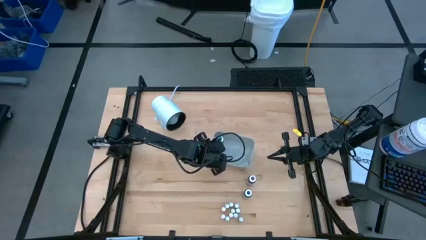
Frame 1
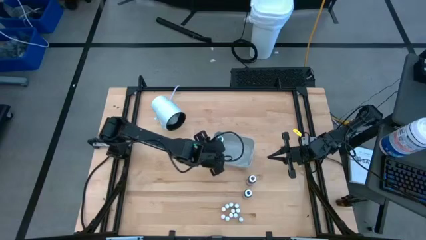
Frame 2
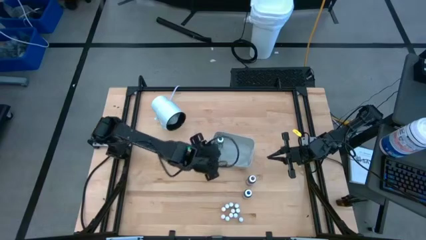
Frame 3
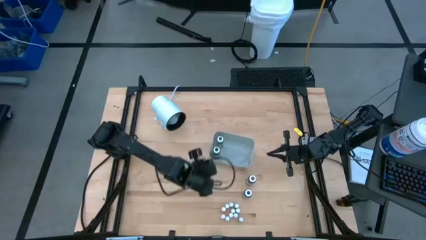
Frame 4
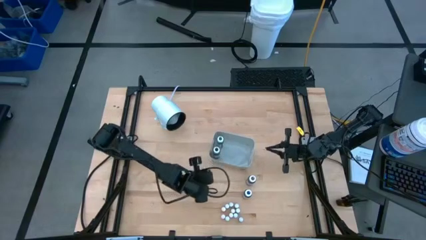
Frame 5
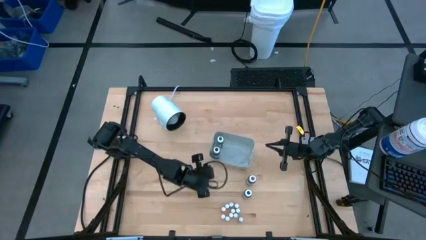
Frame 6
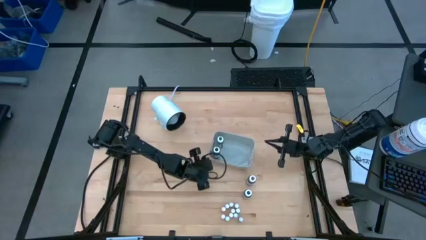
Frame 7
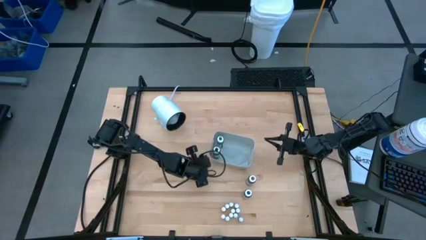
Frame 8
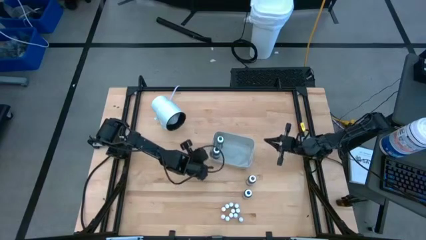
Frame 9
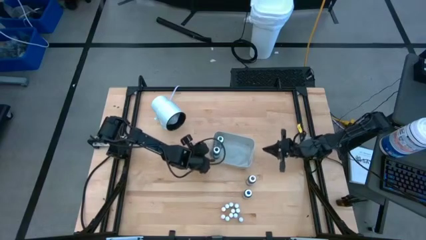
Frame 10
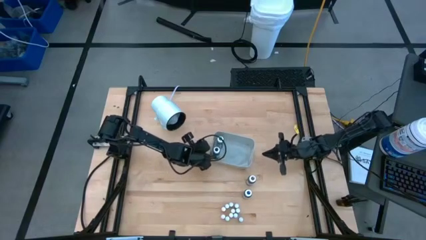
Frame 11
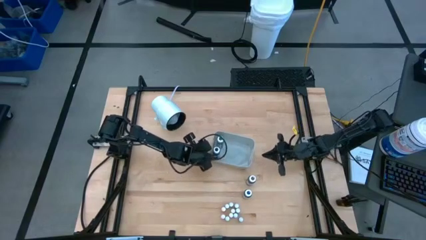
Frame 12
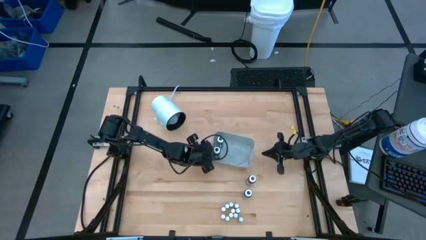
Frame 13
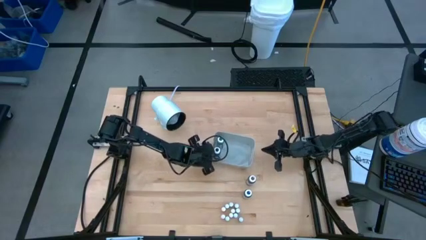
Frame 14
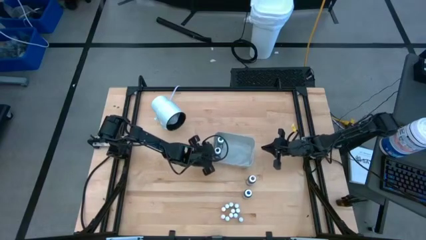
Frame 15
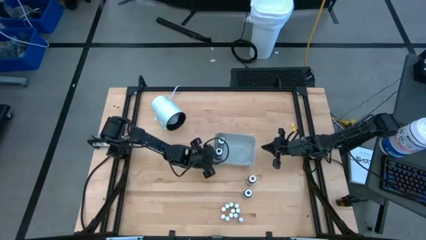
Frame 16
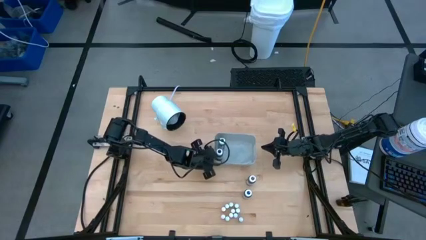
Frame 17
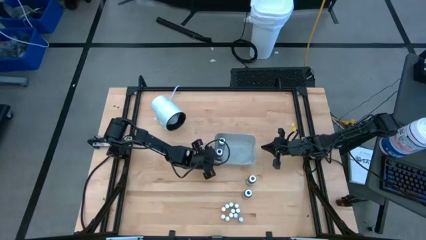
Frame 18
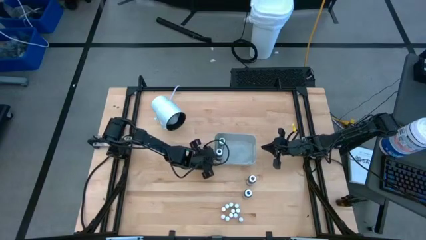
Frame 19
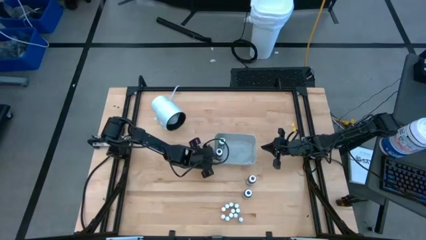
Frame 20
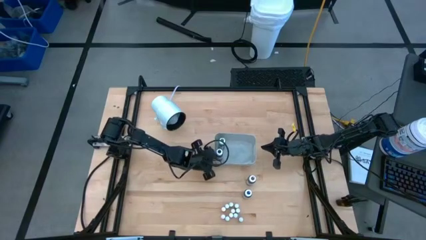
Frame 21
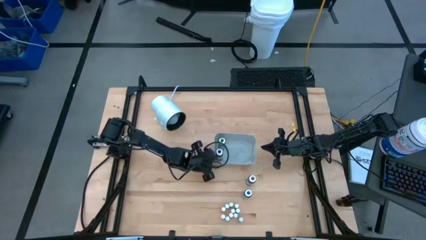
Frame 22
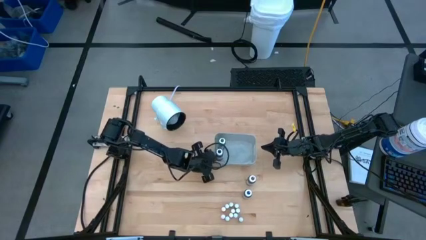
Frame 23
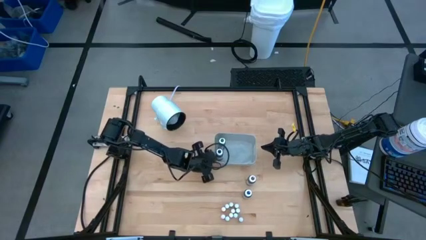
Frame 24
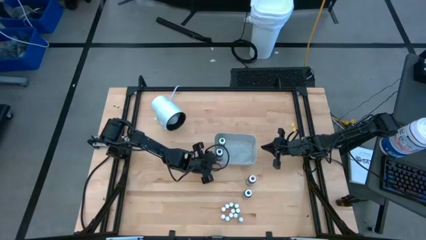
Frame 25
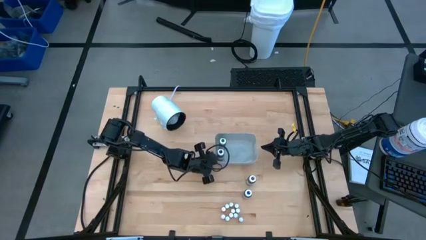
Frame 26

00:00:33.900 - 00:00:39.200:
Task: Pick & Place food coloring
Adjust the gray bin on the table

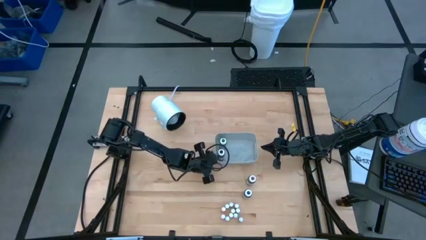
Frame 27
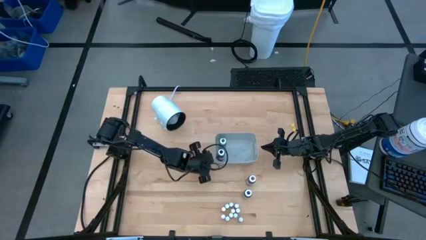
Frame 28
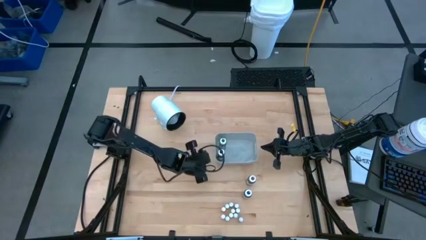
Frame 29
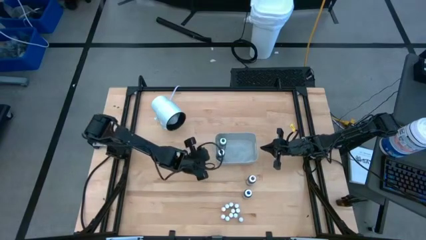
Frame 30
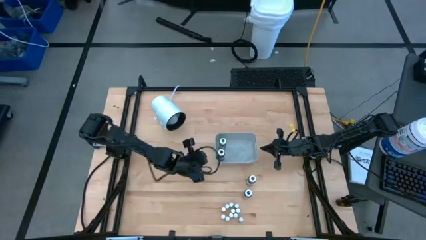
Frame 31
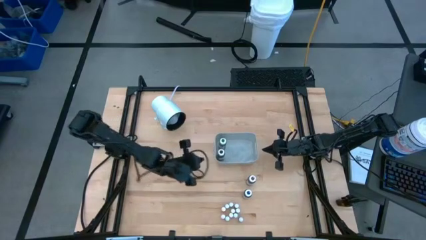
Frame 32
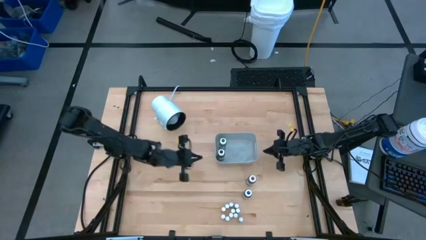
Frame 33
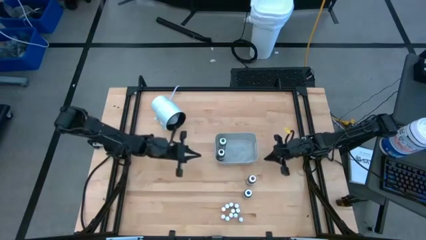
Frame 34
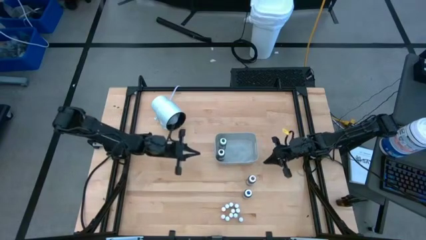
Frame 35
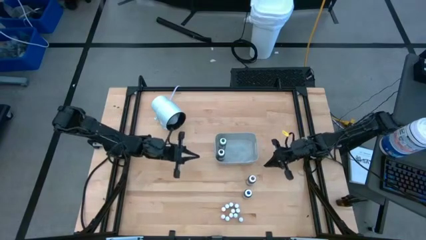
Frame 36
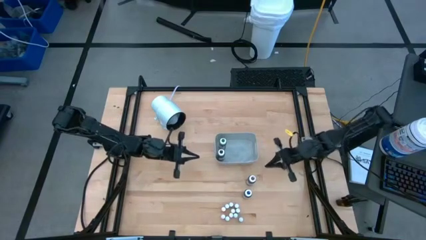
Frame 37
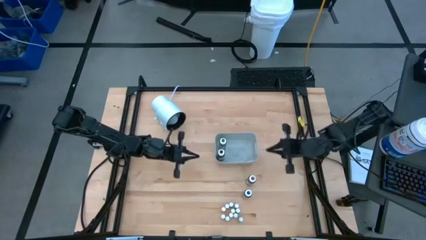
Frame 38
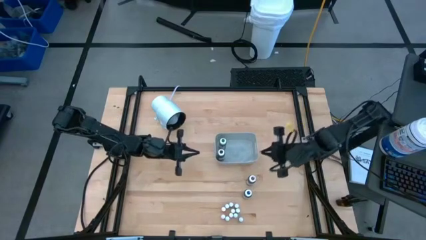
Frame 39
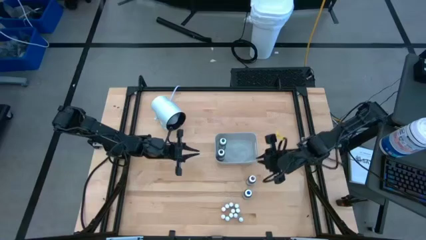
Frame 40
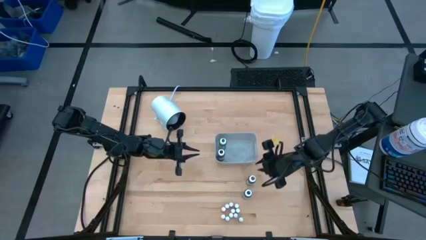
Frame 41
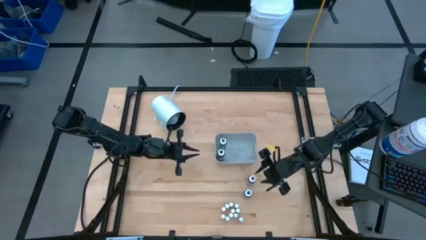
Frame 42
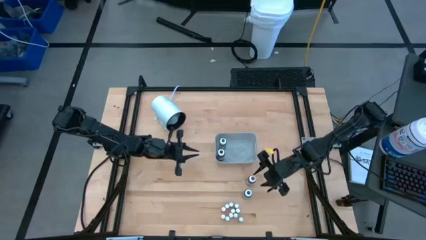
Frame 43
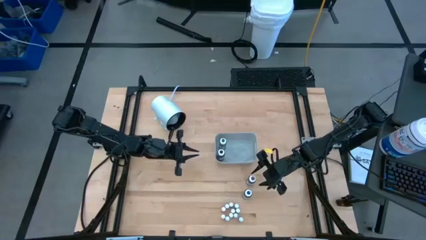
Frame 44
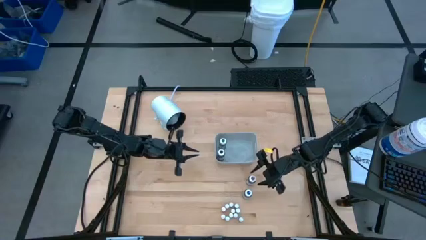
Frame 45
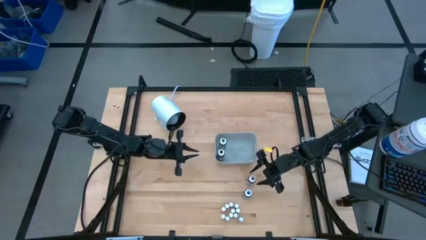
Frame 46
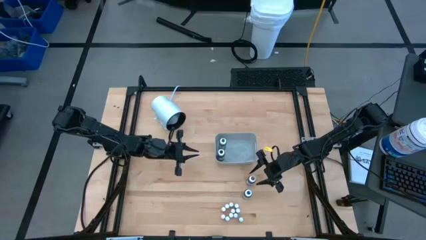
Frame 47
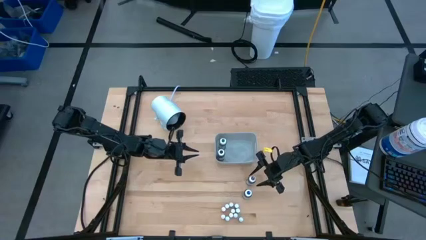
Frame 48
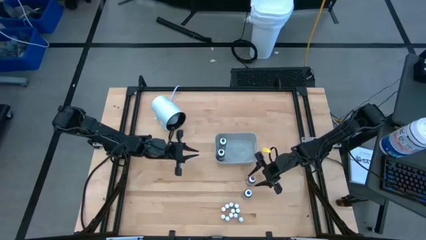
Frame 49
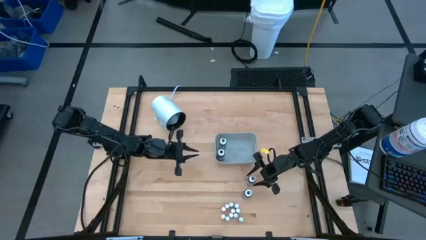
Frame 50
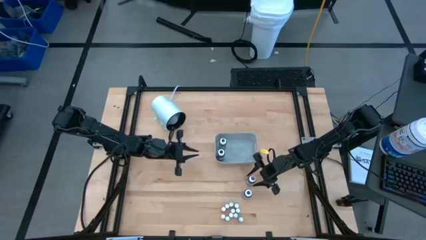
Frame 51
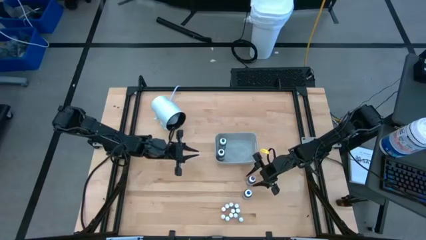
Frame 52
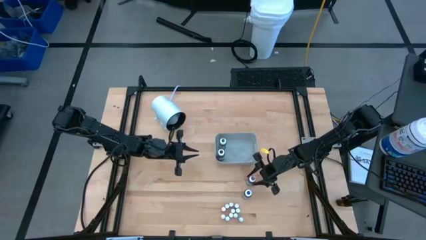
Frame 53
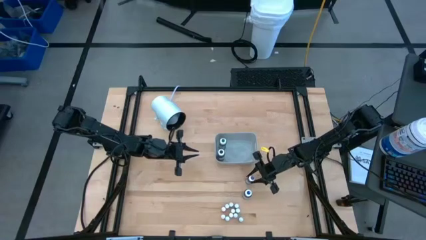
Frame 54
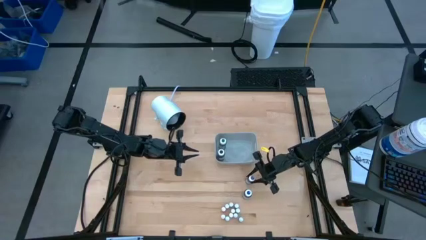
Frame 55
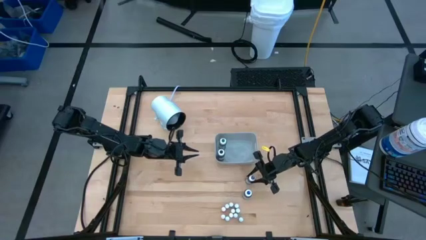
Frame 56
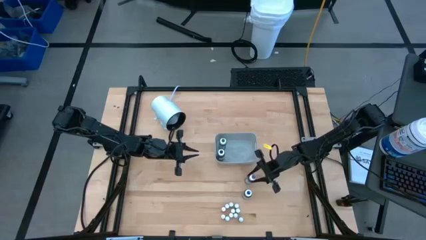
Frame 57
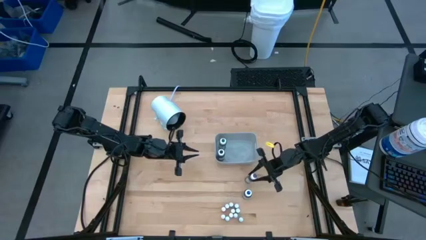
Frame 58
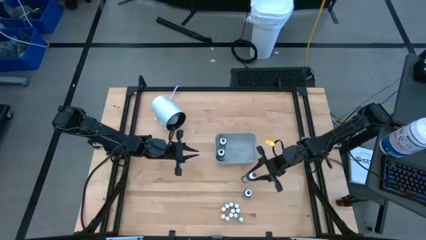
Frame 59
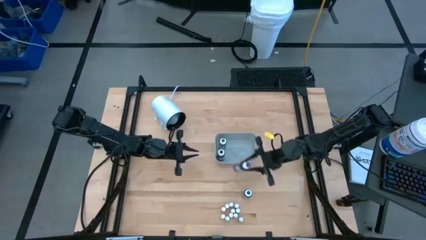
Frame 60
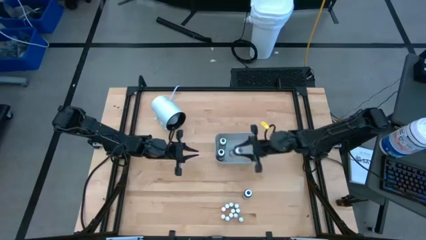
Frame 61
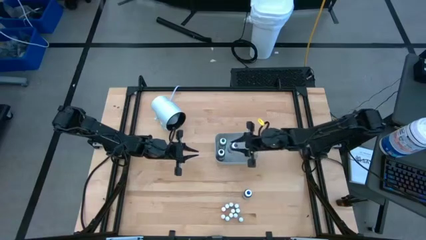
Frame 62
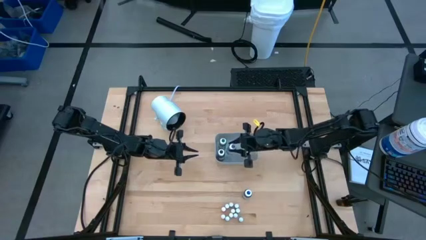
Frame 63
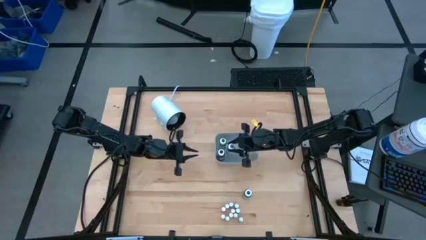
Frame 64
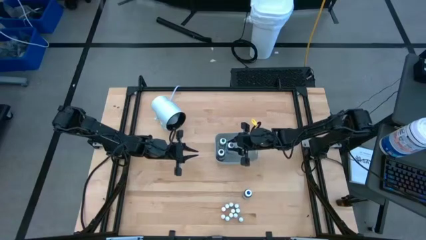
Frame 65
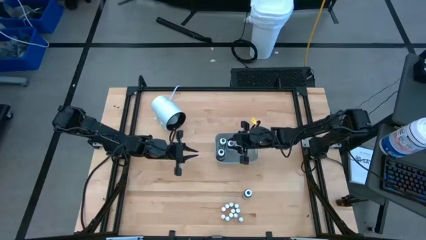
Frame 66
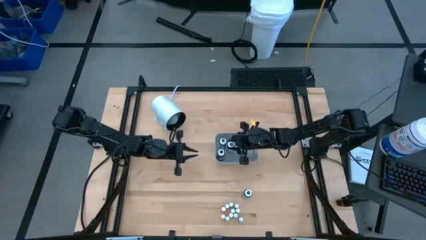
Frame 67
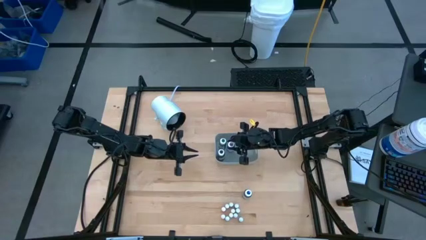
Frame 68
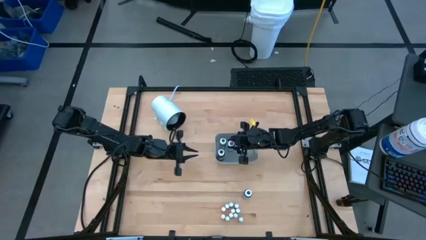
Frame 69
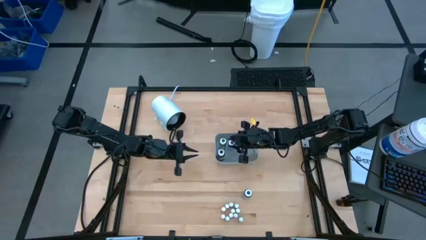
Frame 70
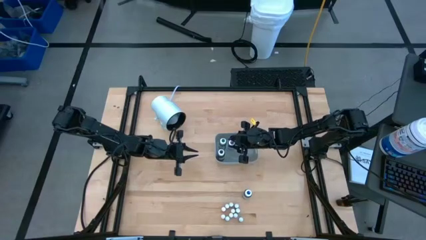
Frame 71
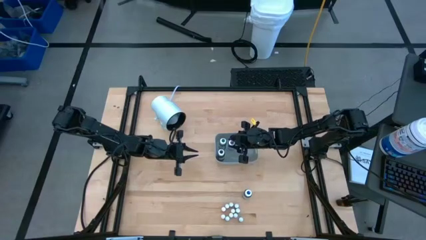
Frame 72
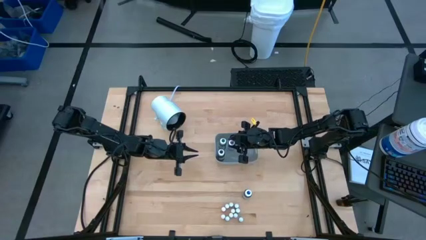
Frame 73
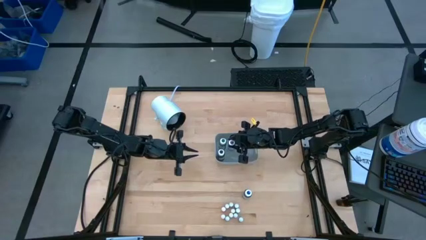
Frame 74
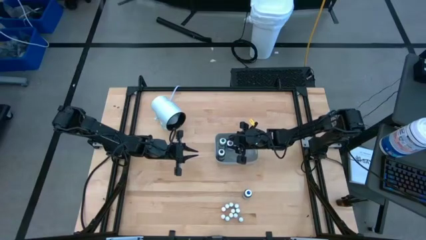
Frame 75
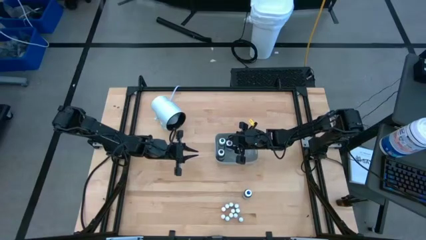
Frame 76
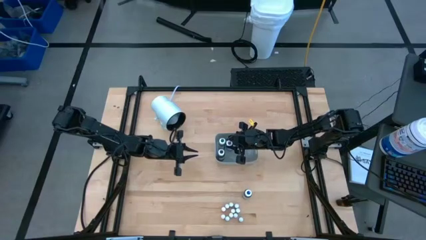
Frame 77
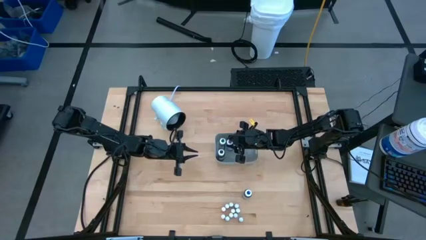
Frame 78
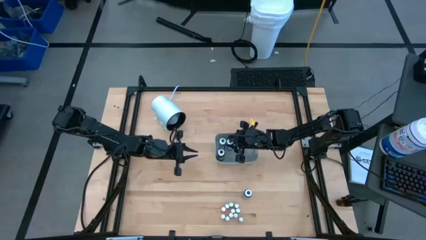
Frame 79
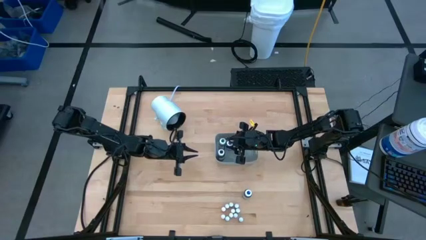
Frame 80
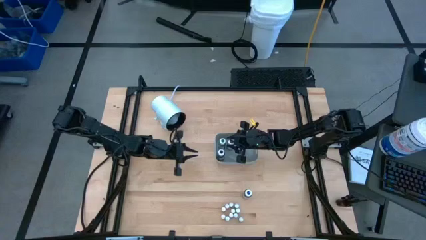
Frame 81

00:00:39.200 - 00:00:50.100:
Put the big purple food coloring bottle into the gray bin
